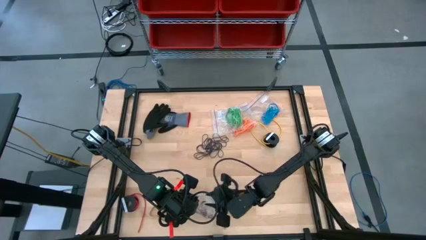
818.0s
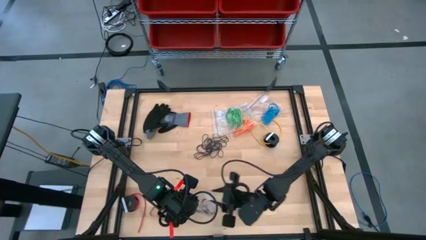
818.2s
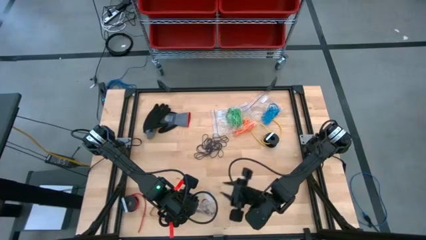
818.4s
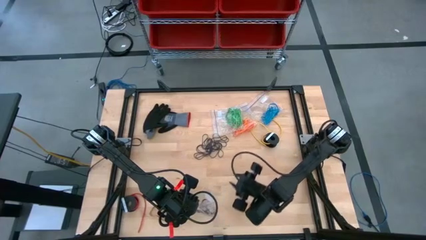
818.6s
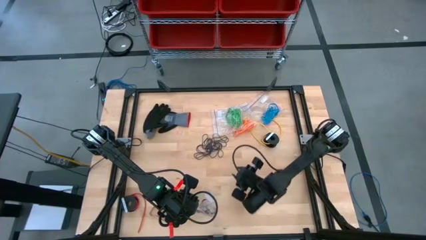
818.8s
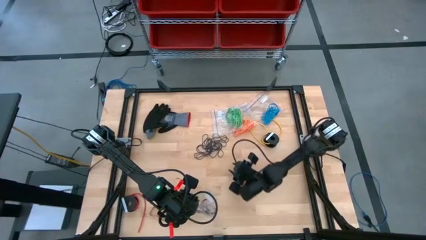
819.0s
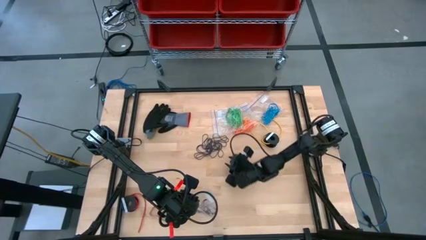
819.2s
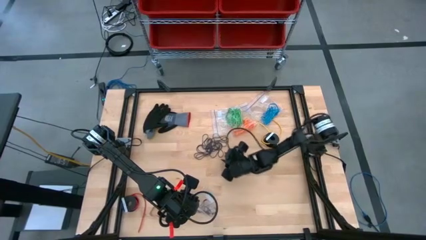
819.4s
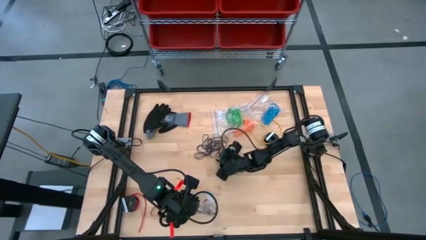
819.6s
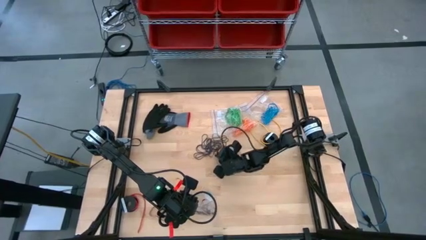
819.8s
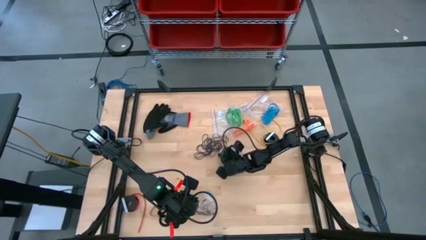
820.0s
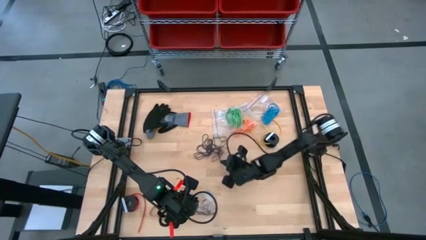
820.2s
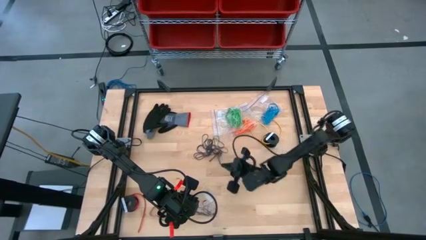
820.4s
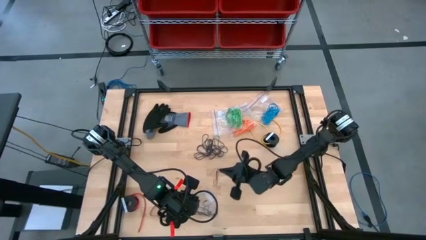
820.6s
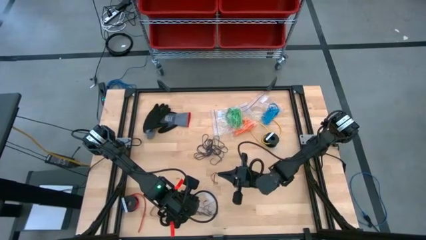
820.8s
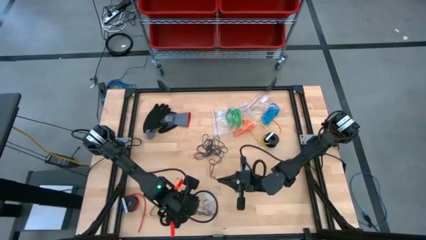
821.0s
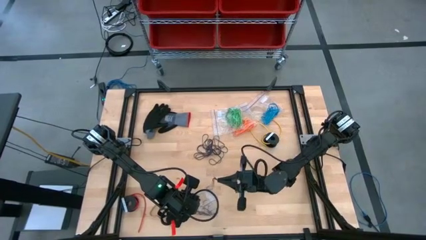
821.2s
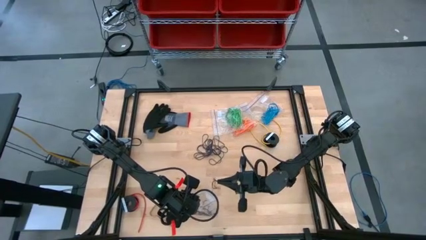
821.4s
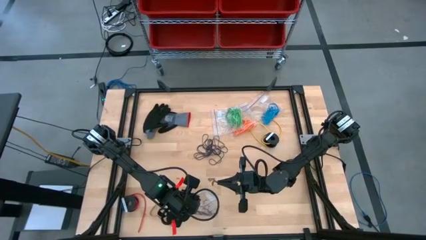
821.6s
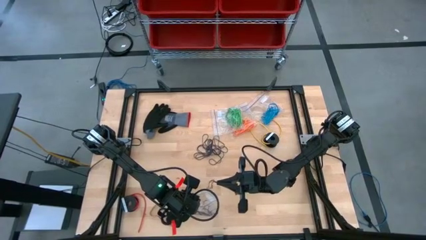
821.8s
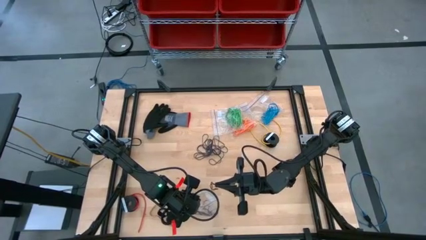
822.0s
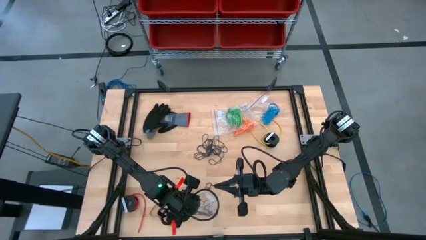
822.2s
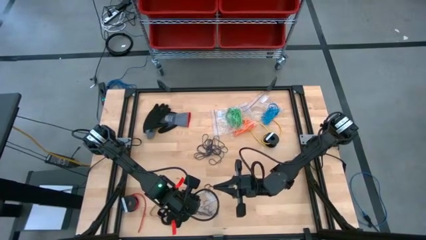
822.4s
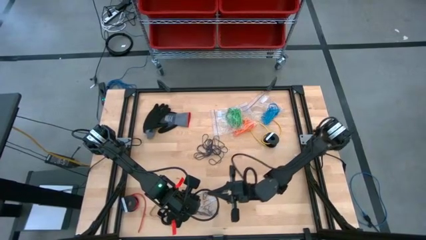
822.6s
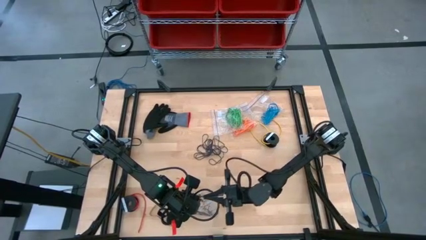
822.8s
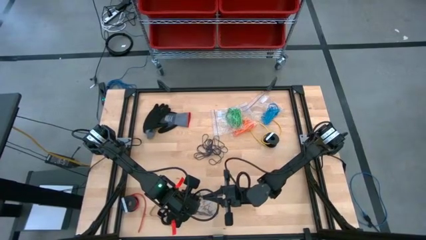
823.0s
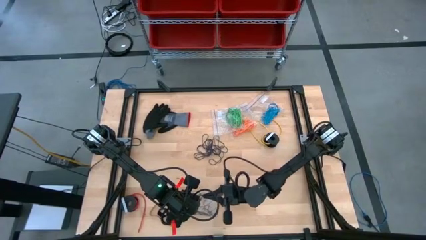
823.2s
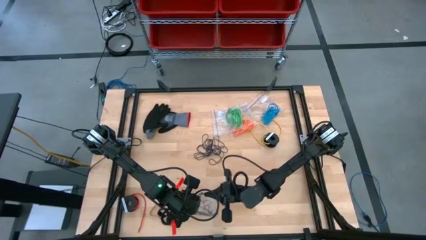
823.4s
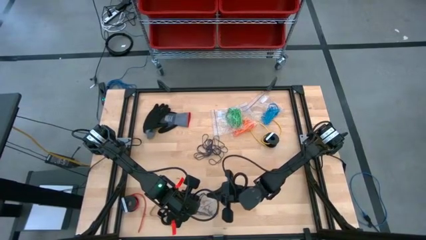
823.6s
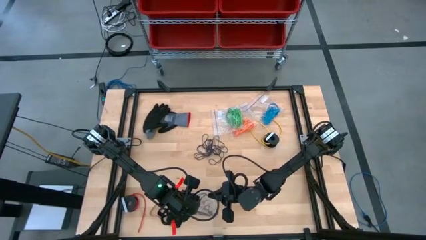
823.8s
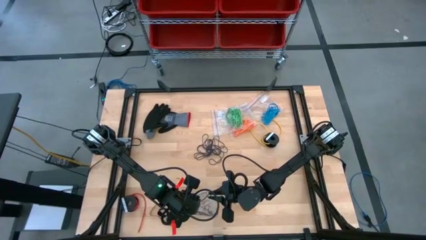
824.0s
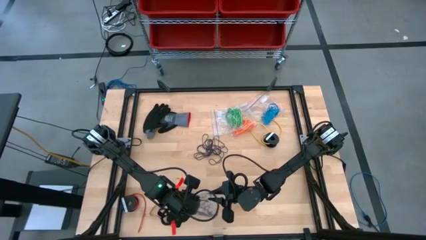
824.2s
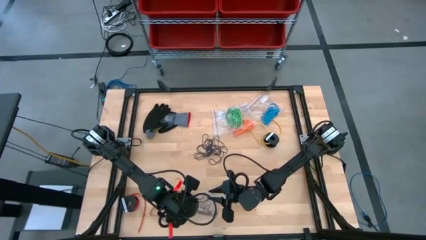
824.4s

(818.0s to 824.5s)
Task: Sort rubber bands
Put the black rubber band into the transparent zip bag

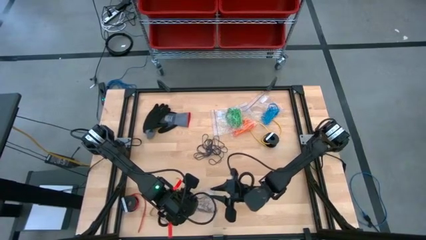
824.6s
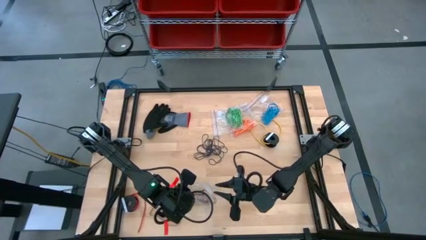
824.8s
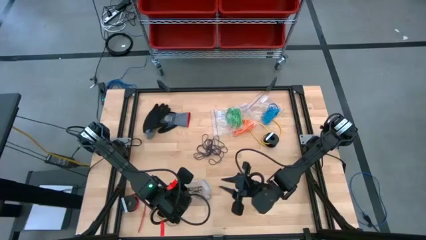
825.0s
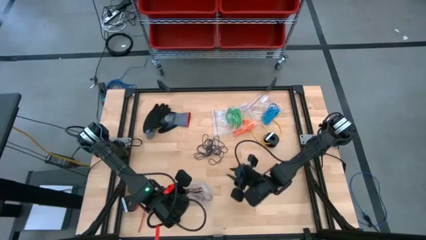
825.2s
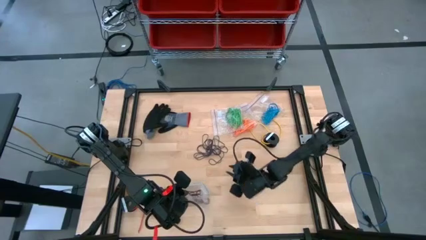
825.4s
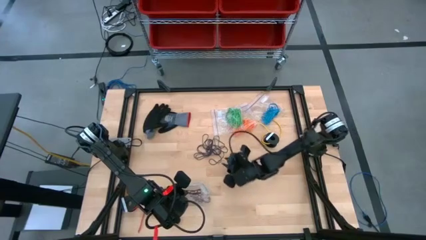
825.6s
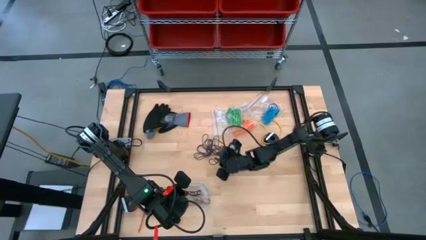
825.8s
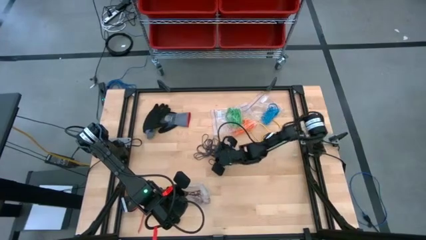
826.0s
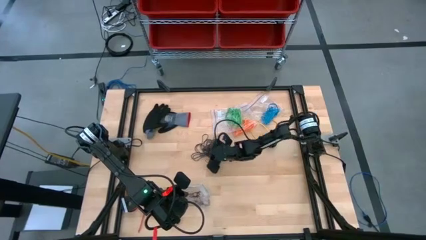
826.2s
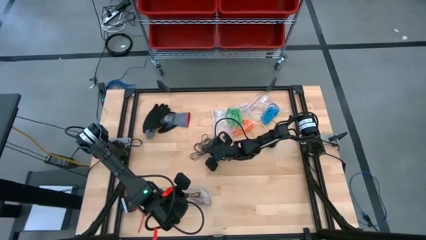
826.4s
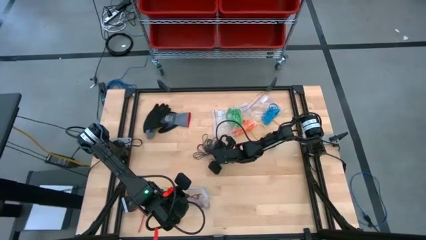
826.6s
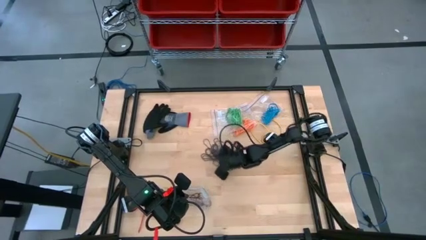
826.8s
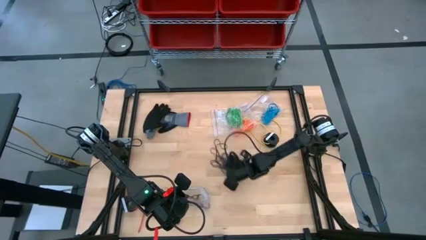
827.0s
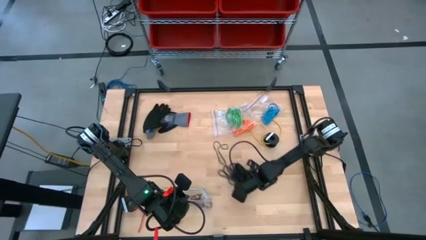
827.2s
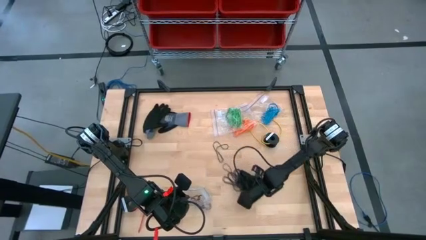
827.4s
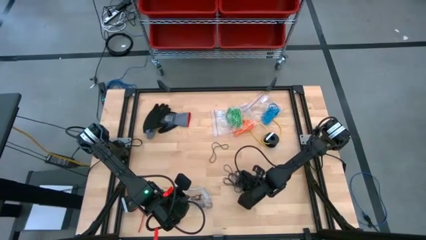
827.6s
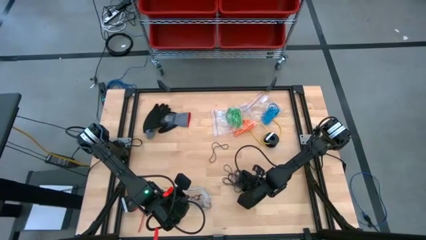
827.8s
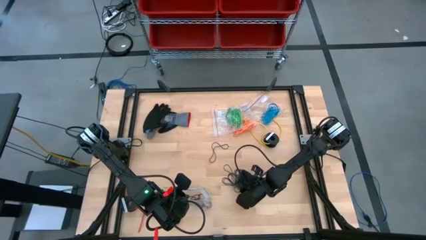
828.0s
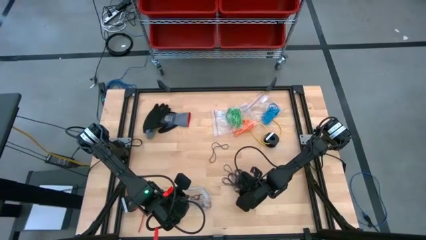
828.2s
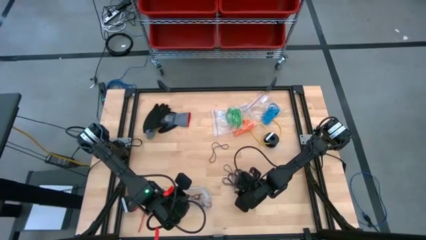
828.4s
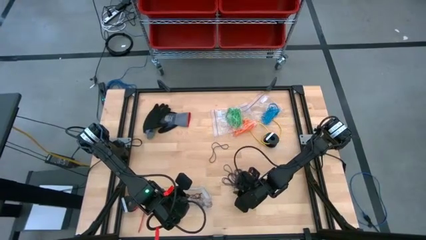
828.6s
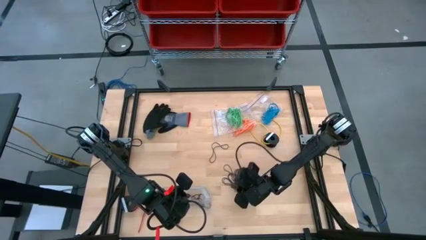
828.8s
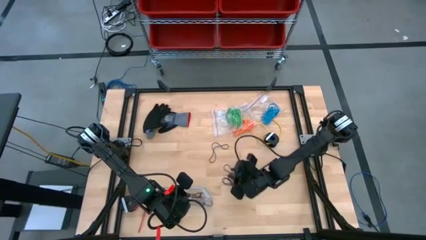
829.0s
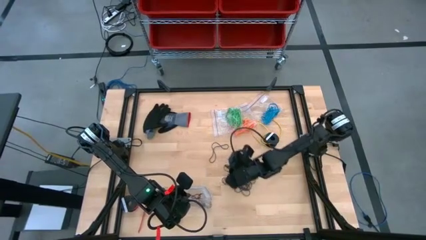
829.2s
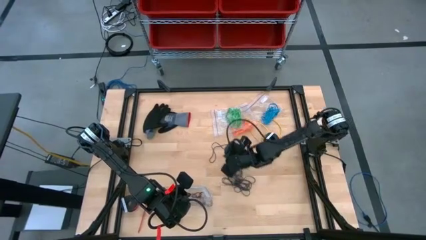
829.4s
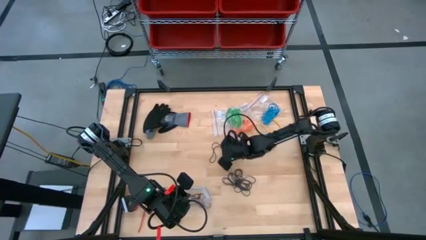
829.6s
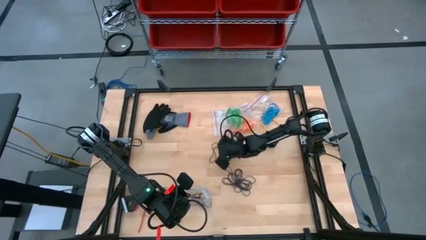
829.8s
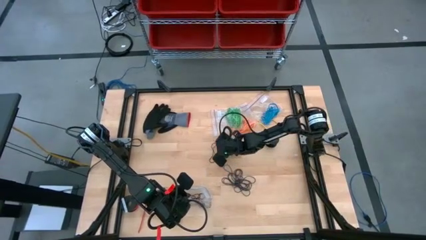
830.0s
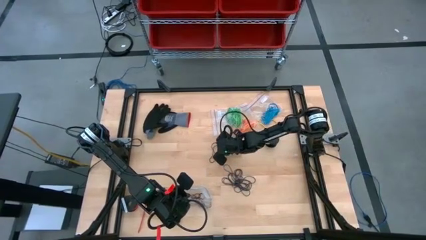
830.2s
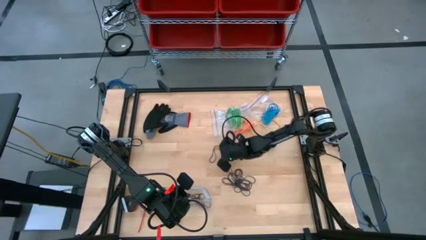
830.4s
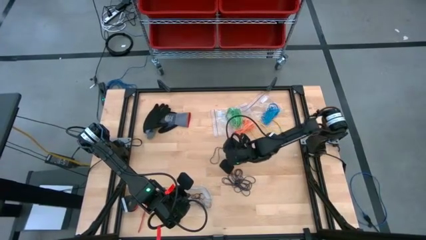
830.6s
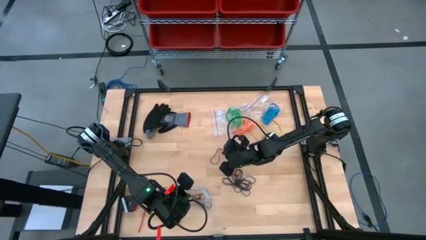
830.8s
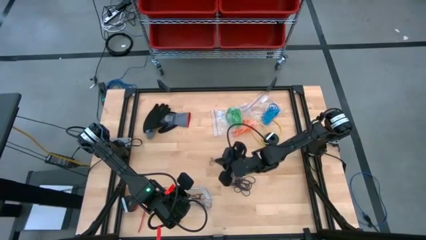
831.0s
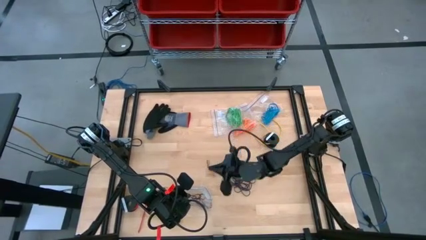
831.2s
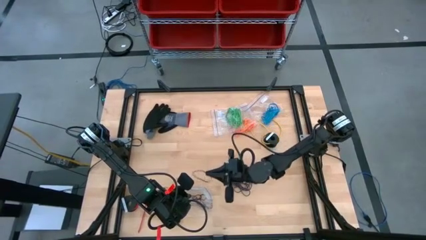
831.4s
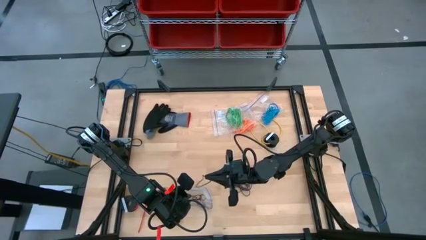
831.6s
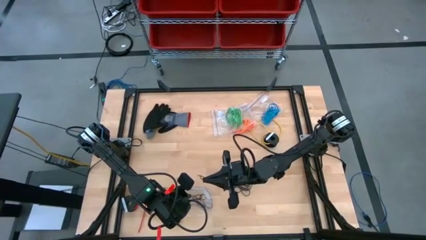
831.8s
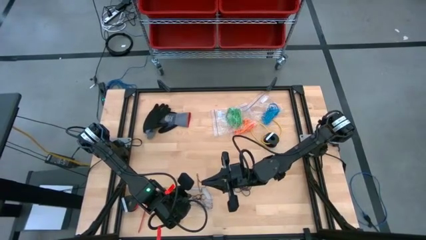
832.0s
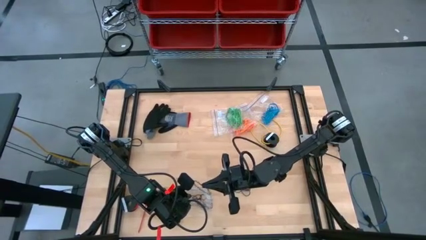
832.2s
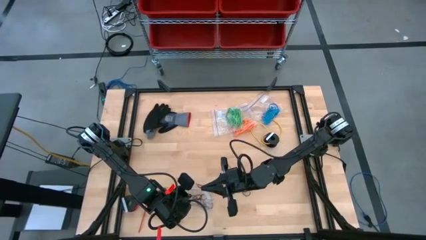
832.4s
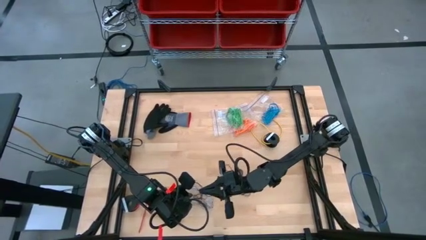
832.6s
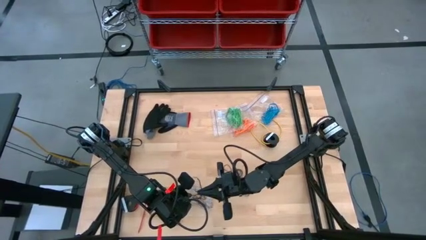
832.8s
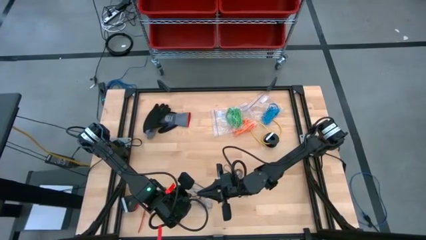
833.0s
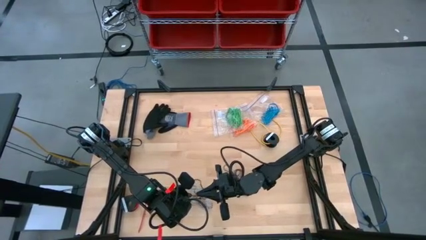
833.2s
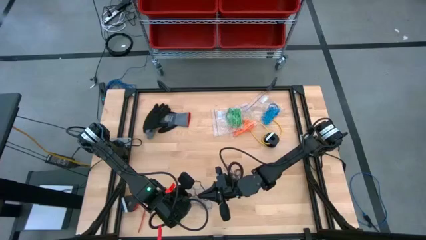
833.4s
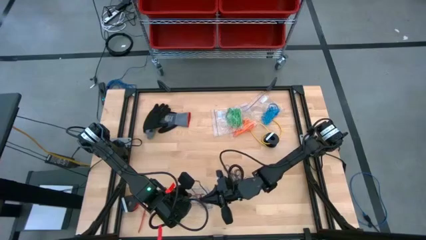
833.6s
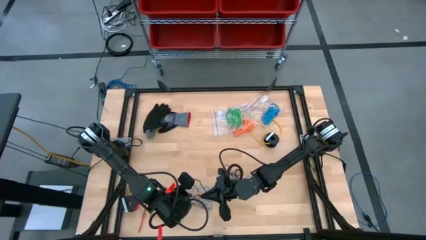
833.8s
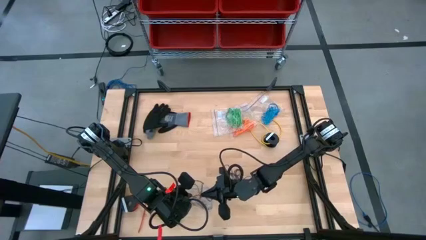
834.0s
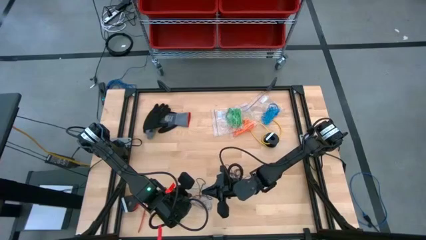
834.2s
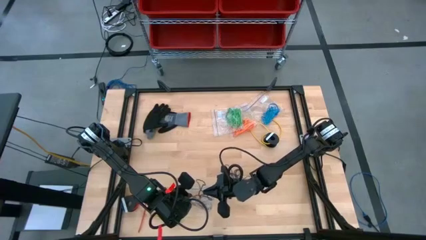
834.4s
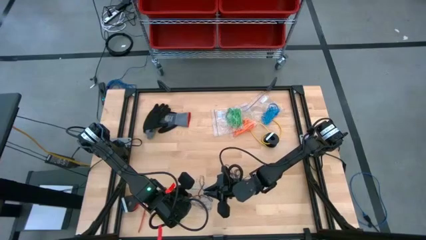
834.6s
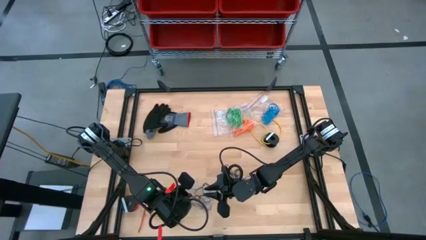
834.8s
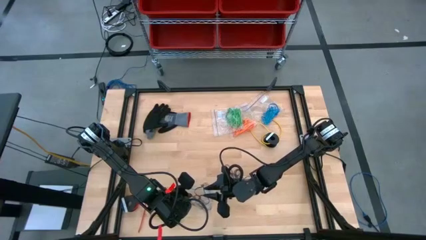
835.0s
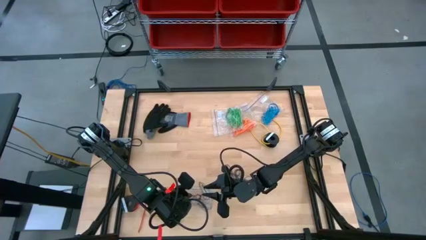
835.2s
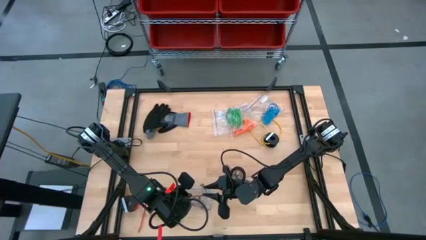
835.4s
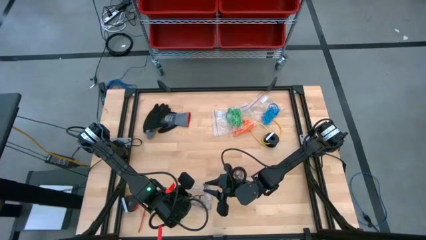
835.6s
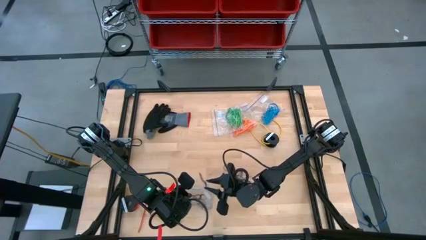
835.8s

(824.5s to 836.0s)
Put the black rubber band into the transparent zip bag
